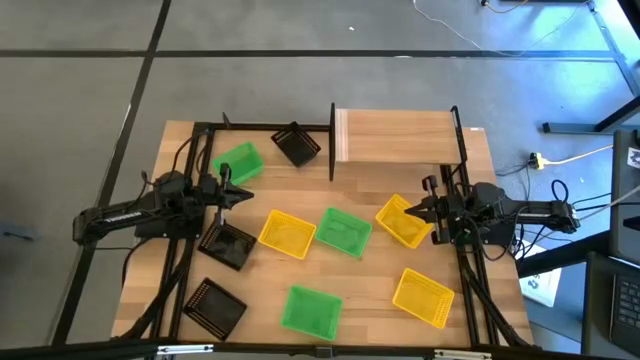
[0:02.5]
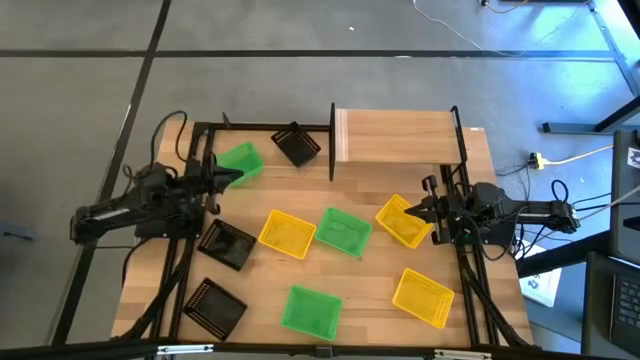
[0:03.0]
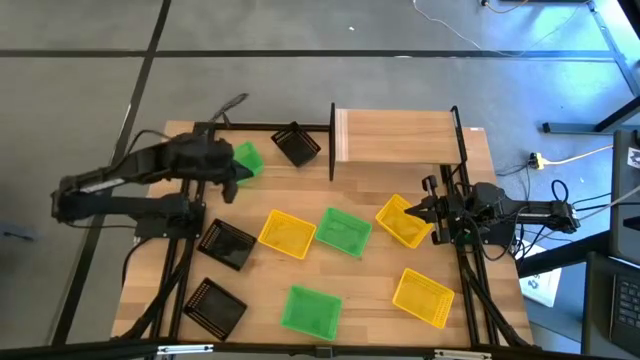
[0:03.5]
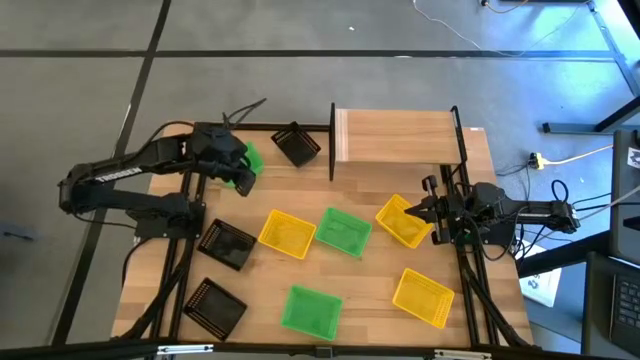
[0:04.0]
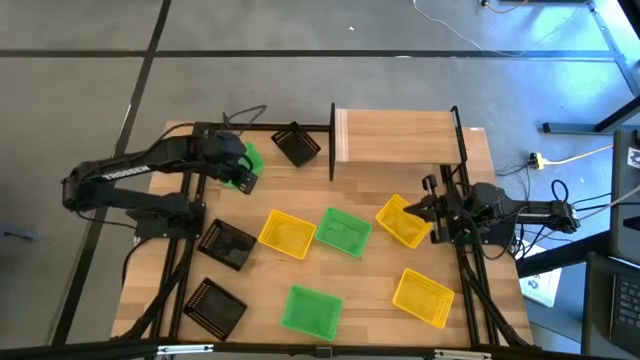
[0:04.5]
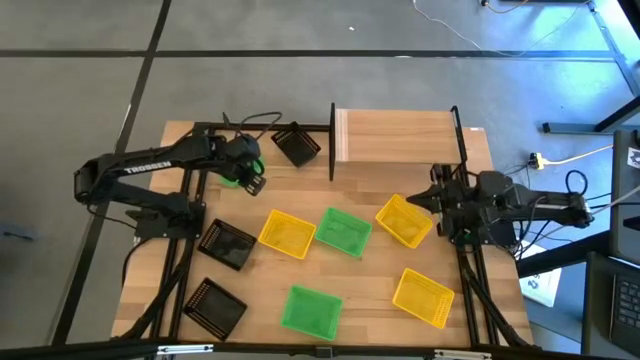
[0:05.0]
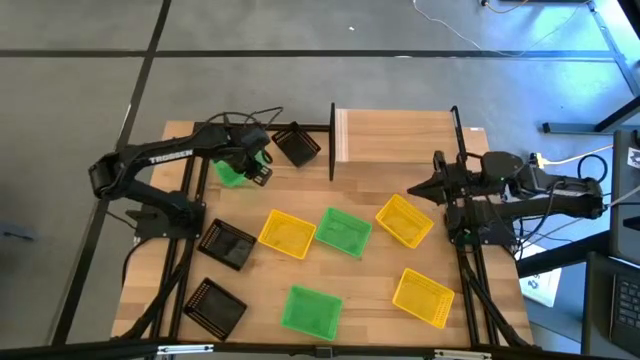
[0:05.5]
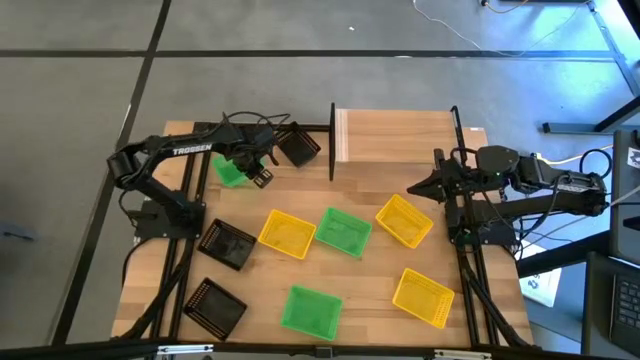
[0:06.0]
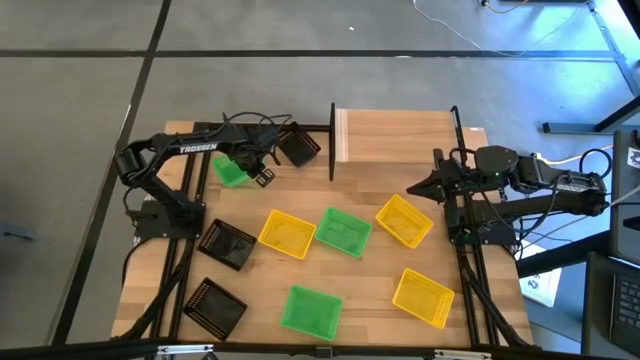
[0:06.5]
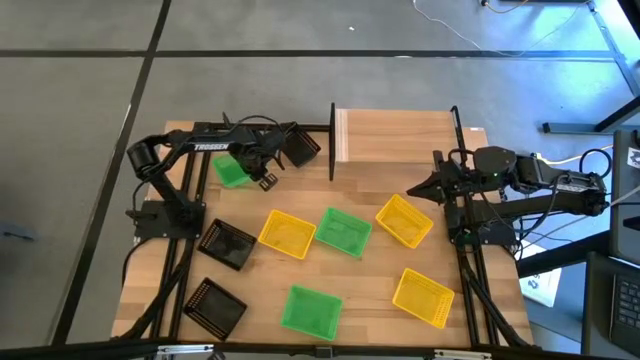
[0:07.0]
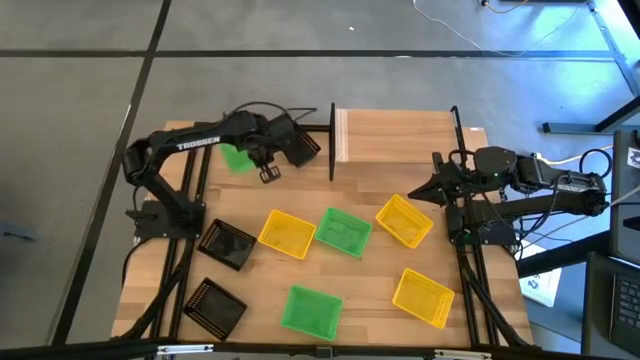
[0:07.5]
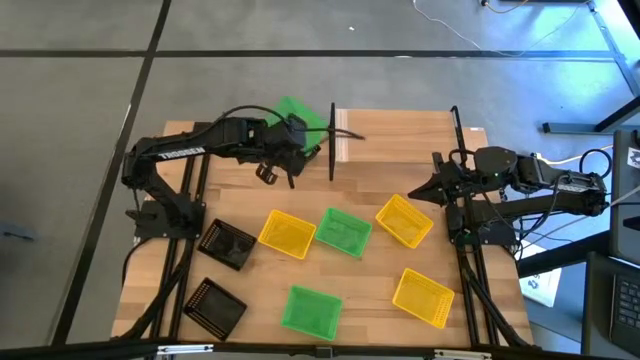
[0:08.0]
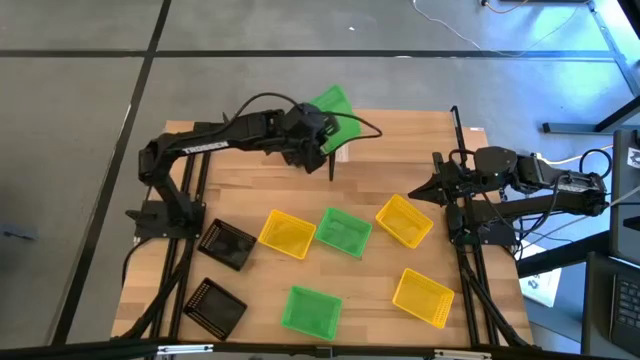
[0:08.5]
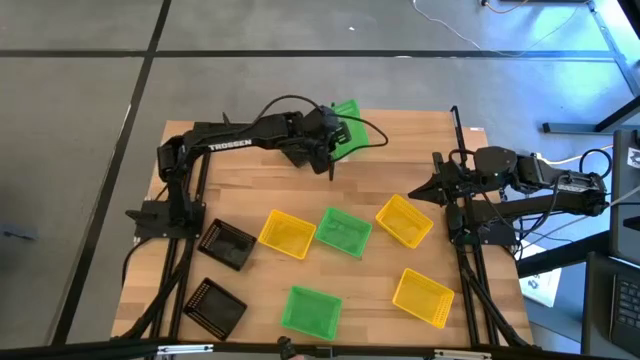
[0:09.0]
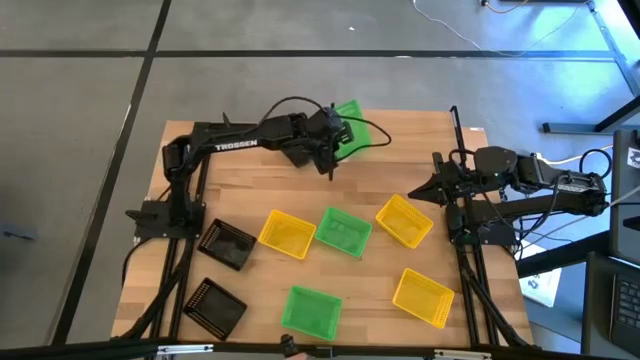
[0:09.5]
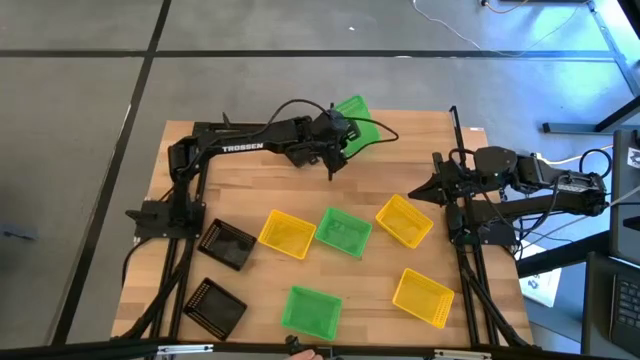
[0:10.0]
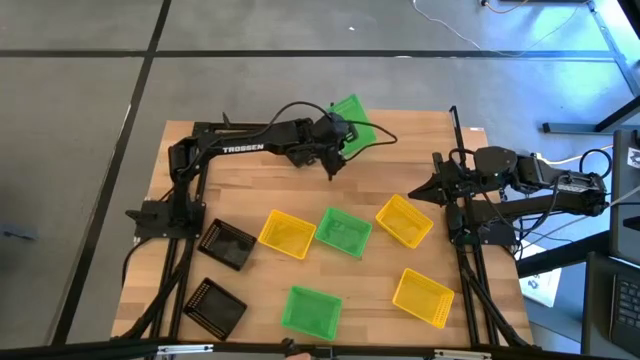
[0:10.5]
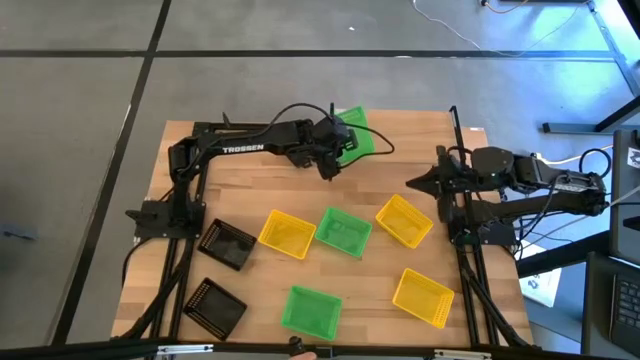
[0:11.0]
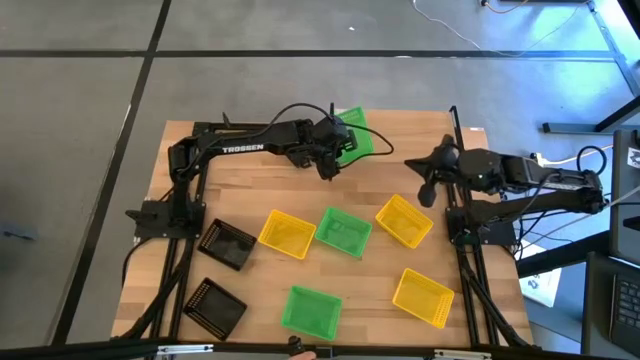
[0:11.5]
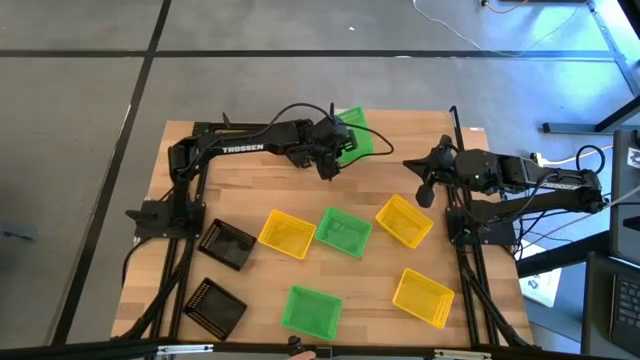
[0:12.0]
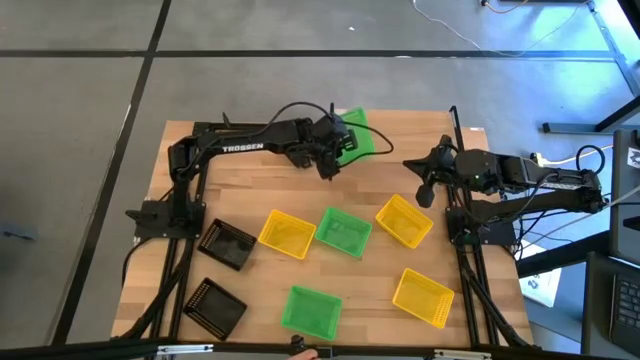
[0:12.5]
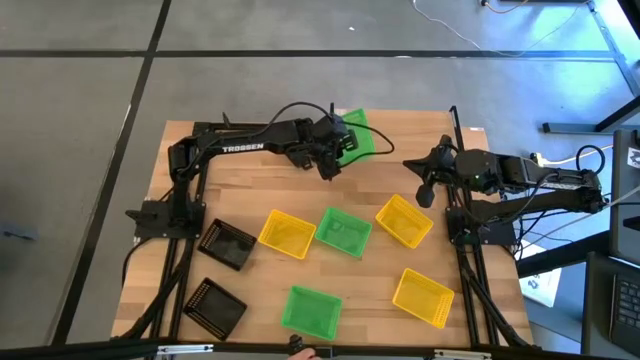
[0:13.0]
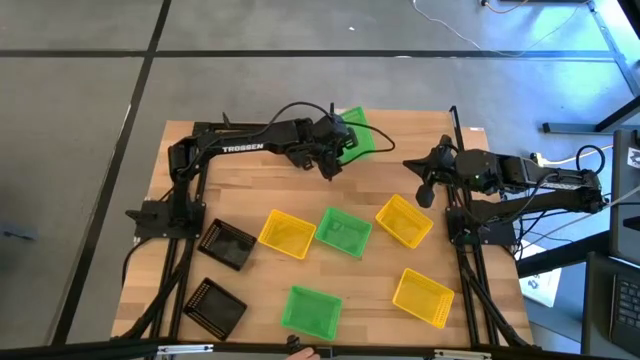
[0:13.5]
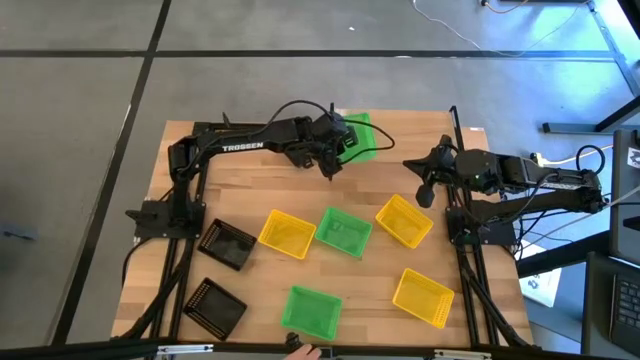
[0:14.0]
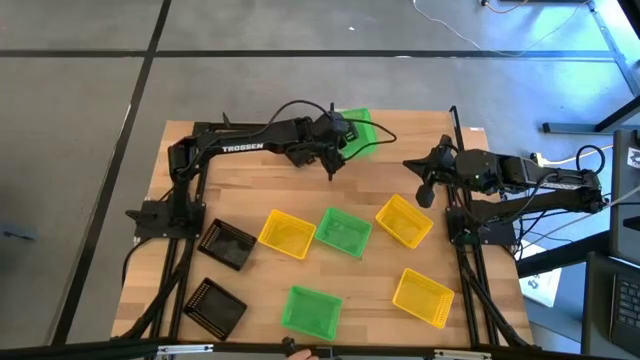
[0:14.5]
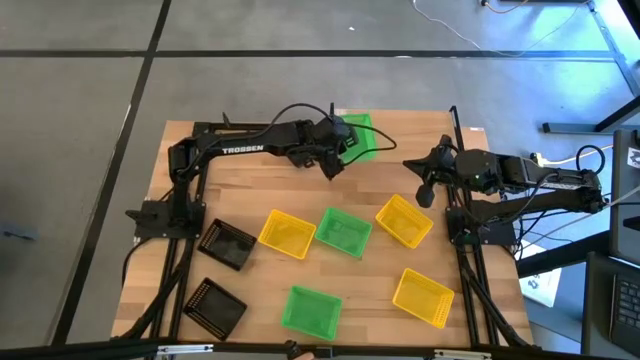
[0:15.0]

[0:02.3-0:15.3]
Task: Stack baskets on shelf by color
Put the top green bin on the shelf

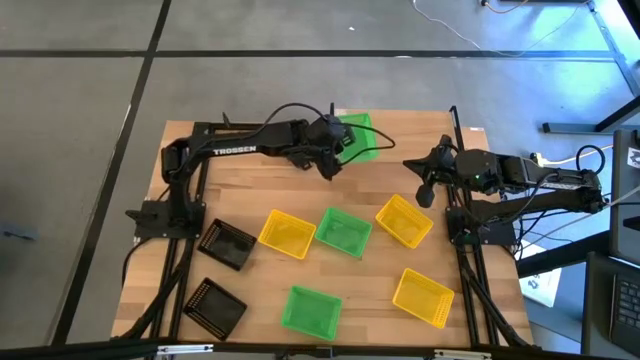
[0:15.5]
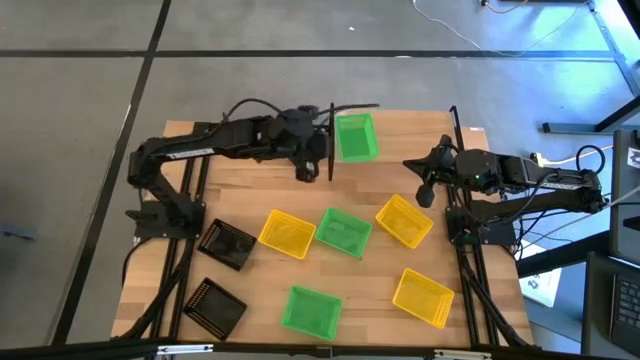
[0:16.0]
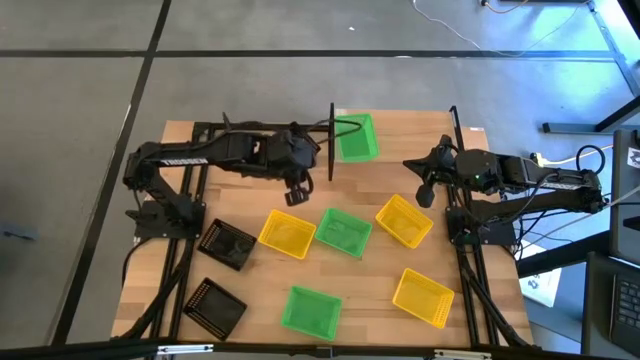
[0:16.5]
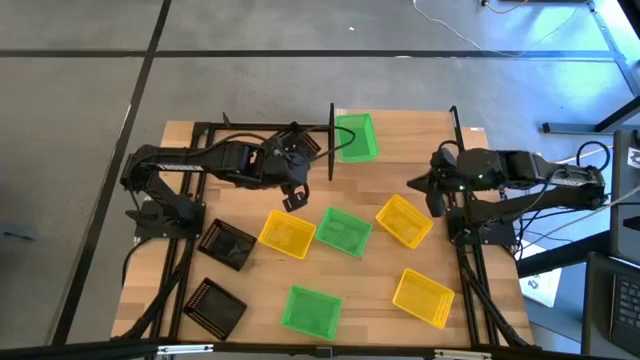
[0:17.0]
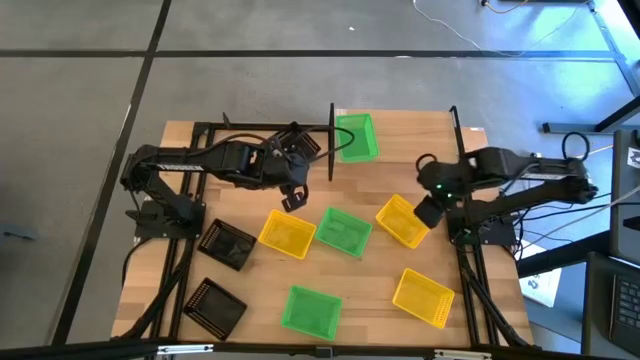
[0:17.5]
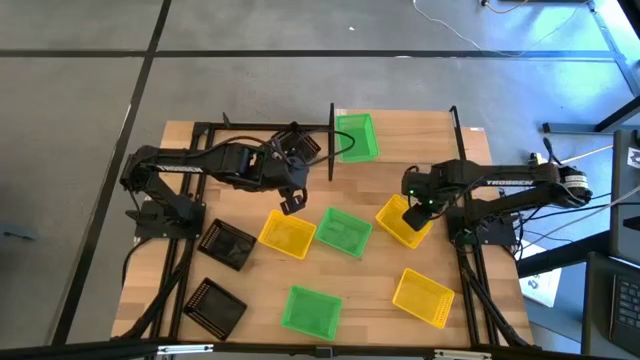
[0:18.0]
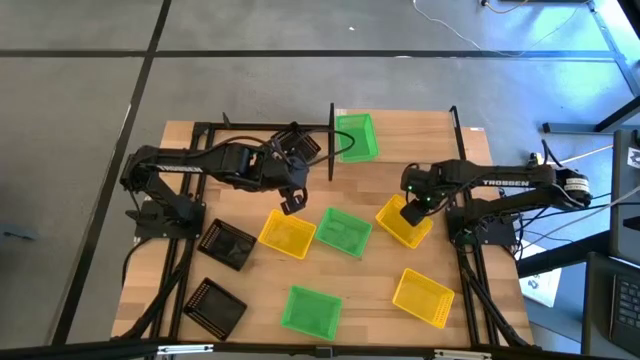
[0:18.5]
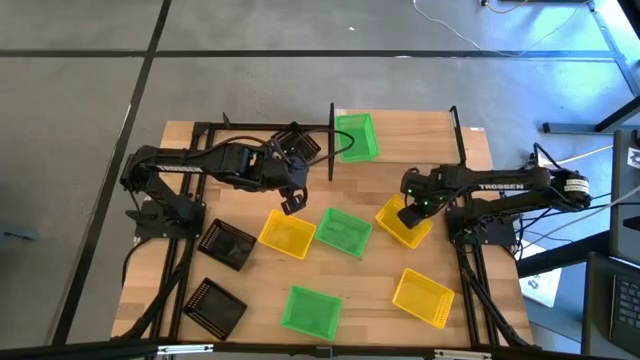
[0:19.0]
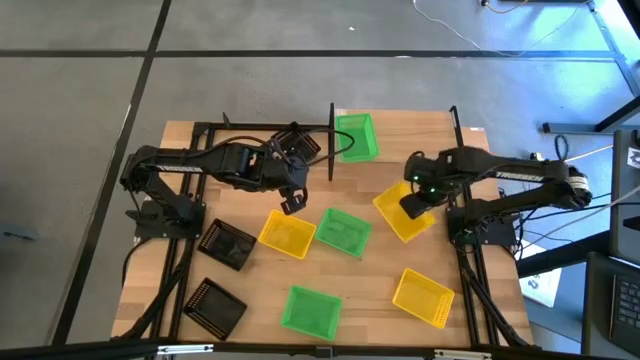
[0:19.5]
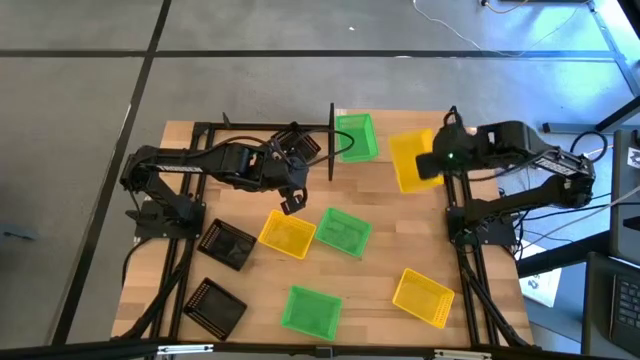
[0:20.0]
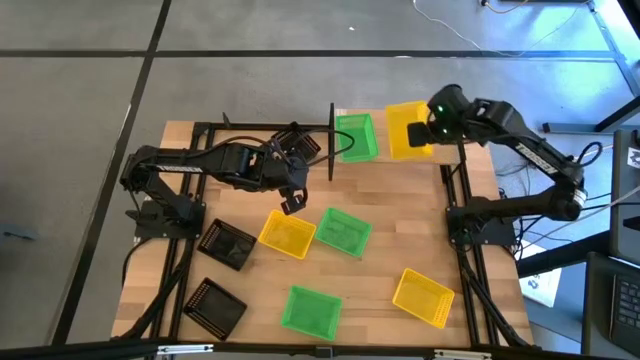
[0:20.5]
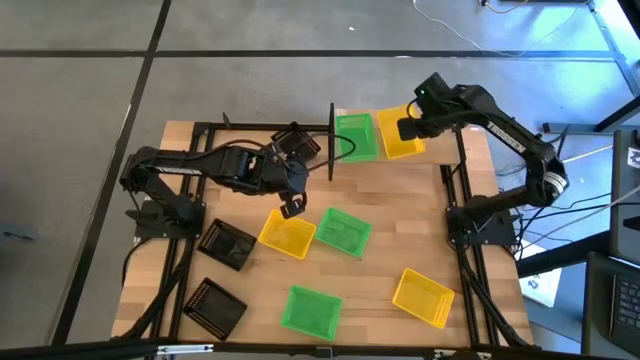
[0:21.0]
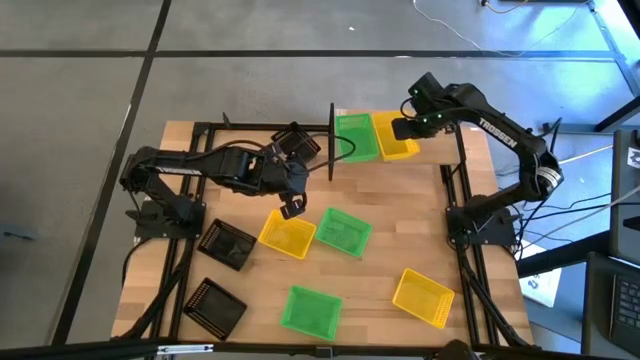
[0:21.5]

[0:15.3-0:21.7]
Put the top right yellow bin on the shelf
